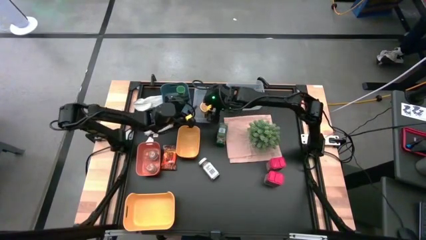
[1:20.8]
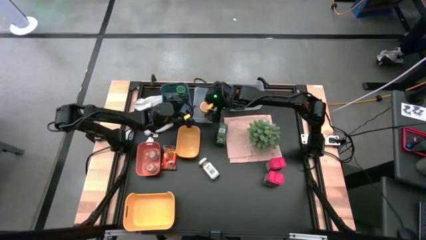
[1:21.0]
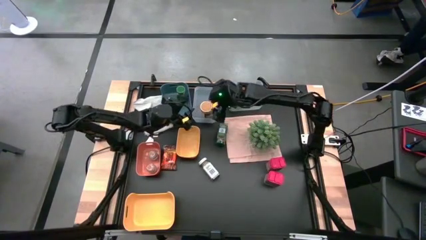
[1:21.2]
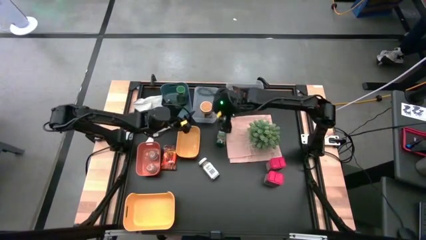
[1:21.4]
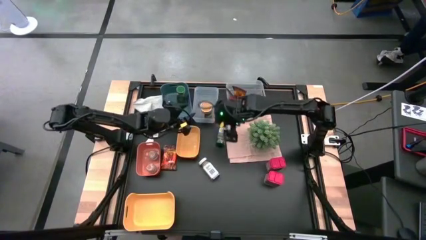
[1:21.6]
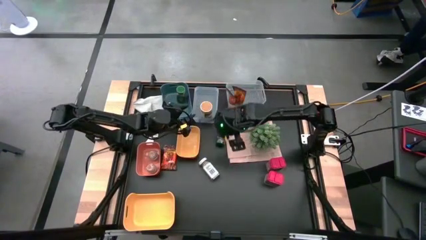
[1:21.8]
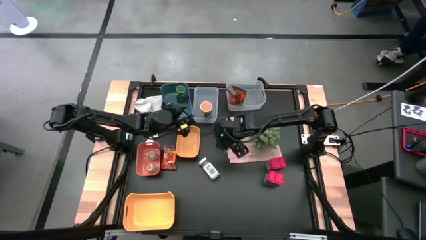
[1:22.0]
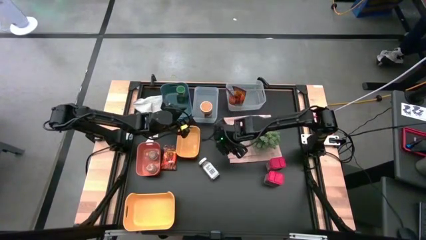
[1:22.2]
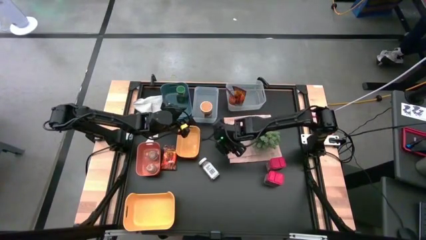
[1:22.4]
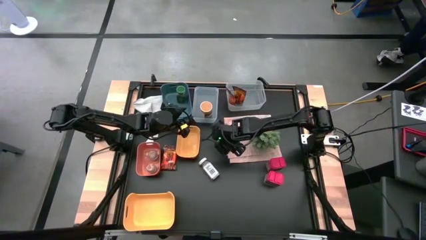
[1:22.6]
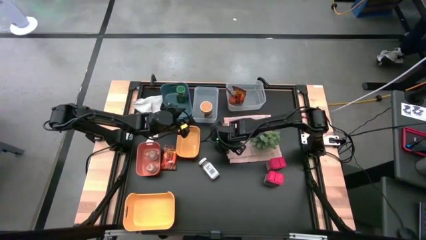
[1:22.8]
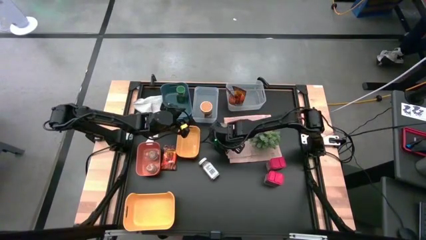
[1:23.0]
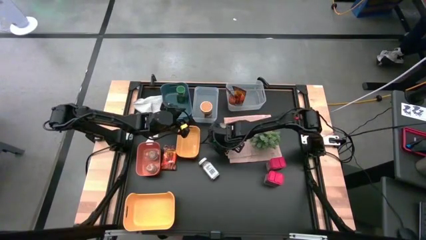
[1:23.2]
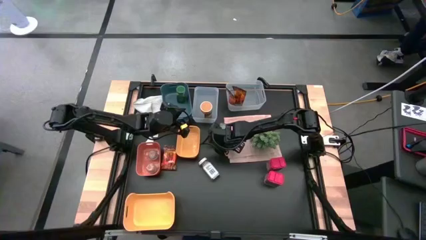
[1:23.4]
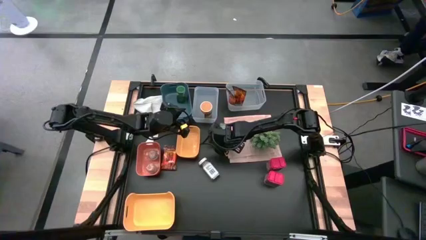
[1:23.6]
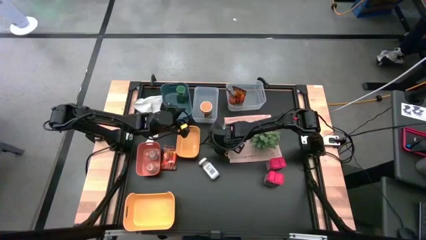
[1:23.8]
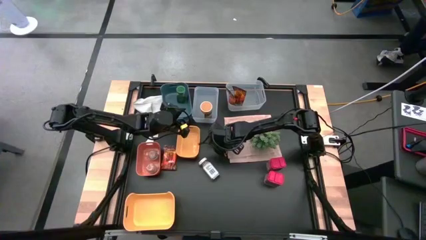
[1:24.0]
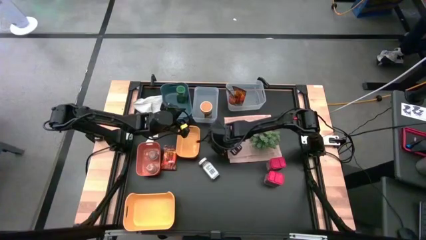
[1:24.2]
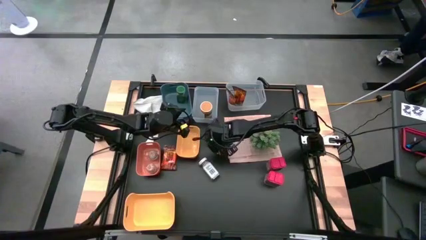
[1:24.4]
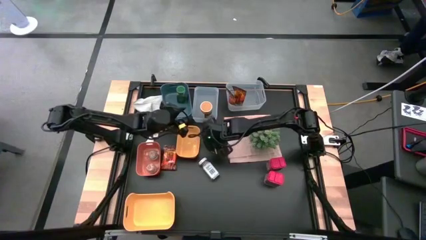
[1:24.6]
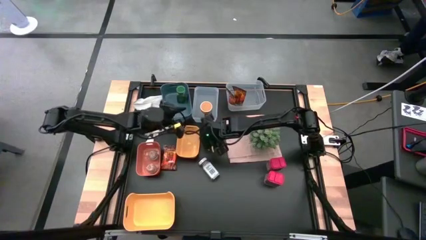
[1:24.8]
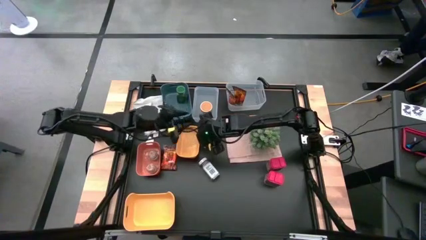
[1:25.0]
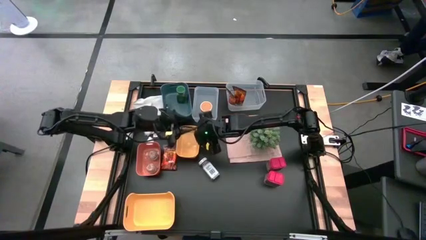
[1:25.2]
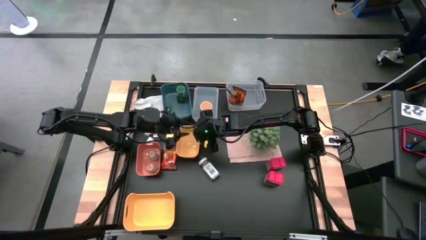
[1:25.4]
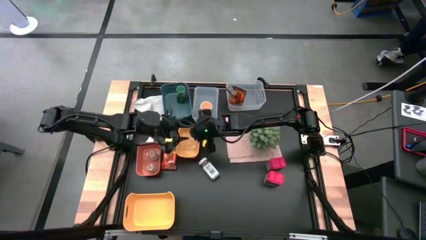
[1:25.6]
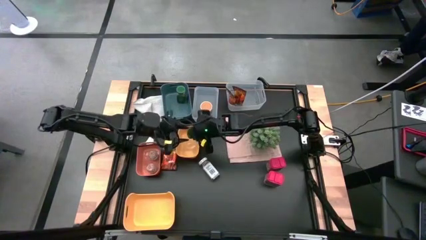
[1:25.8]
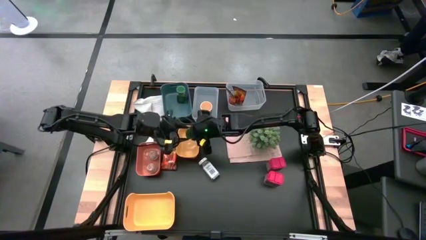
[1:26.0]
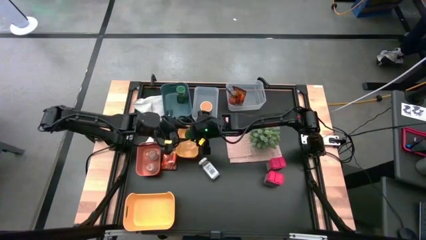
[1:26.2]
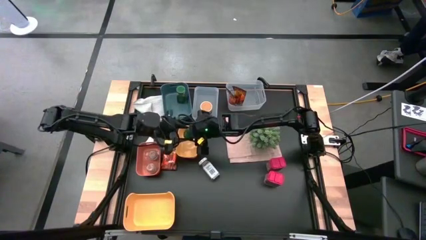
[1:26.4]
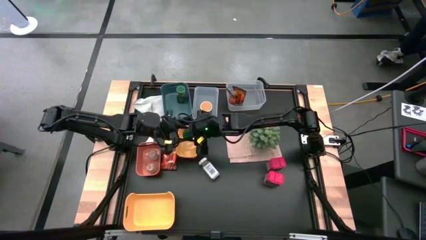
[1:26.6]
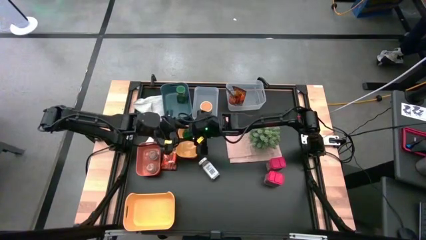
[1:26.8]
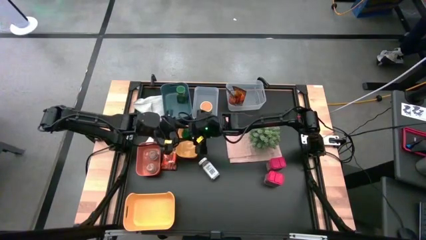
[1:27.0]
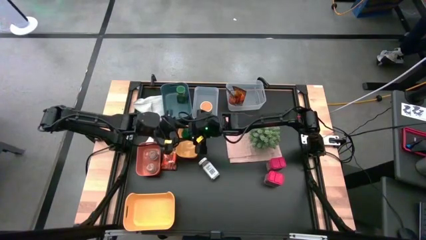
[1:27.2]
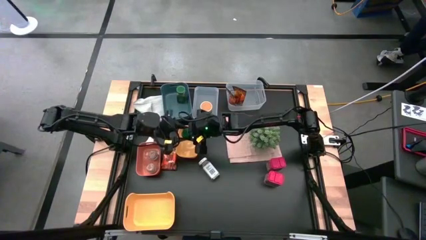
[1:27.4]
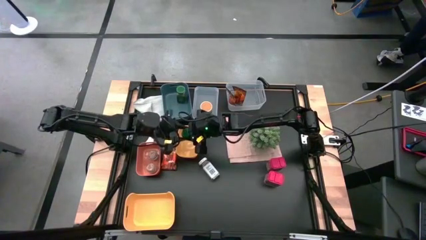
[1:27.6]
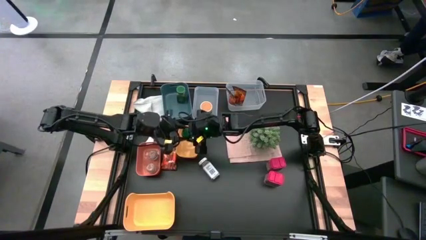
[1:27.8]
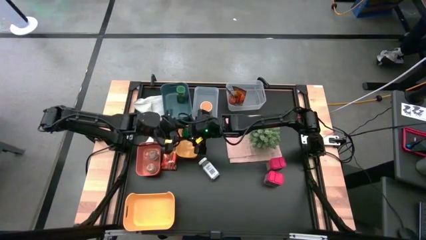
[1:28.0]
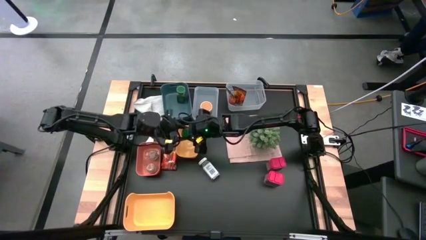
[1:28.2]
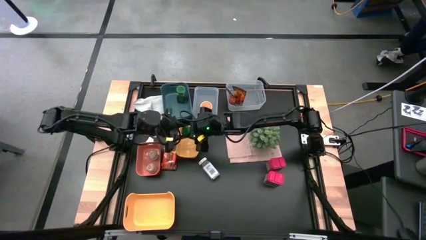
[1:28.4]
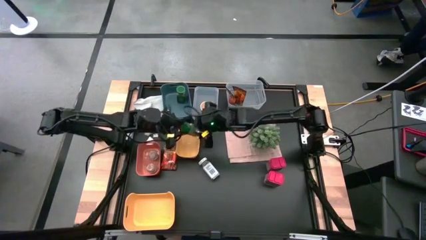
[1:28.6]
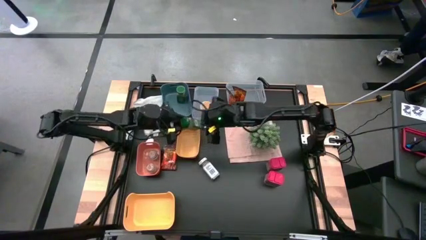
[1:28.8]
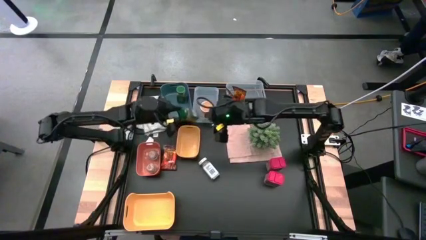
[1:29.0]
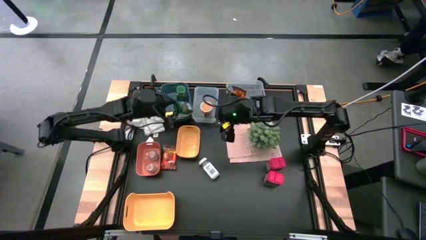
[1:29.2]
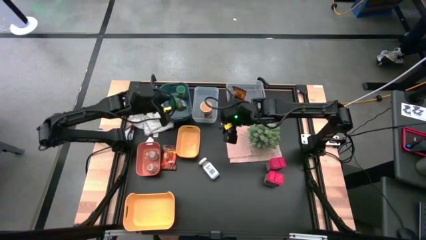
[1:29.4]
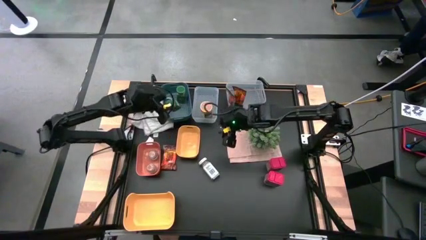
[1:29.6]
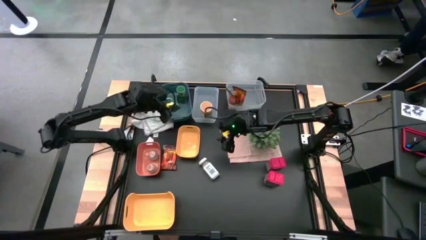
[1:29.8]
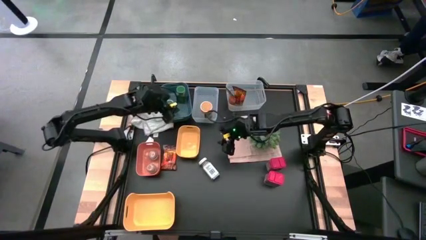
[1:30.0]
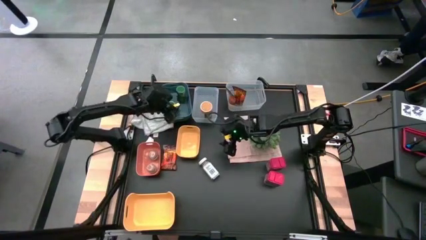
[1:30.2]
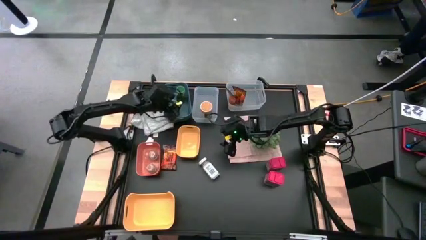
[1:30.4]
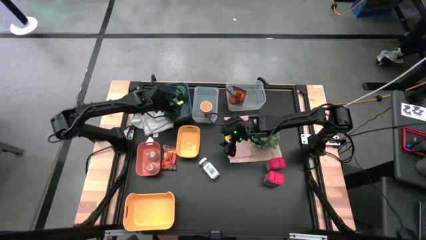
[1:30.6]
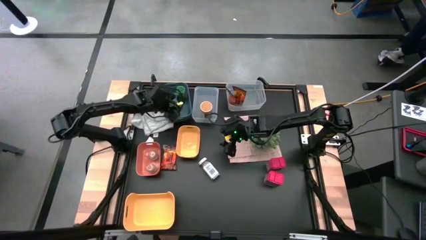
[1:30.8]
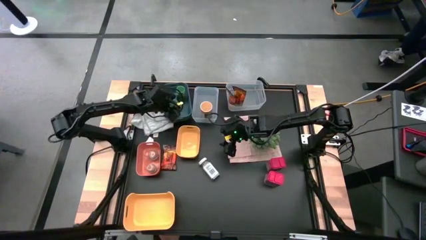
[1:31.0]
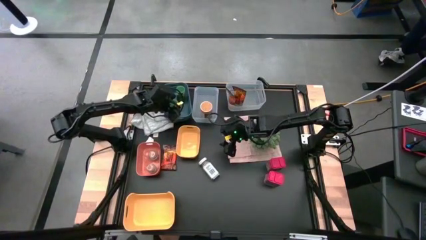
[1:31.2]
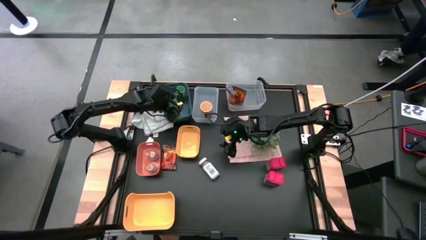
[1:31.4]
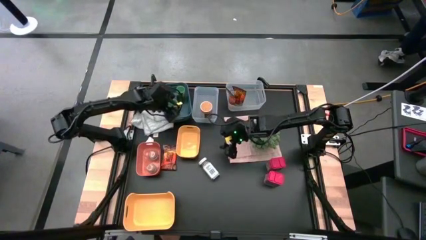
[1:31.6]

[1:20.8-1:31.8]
Task: Sort spices by type
Put the green seasoning bottle into the blue bin

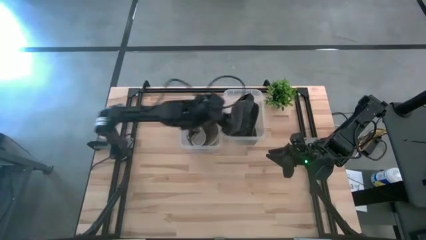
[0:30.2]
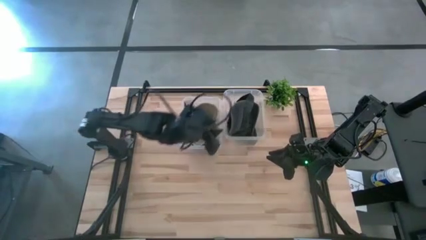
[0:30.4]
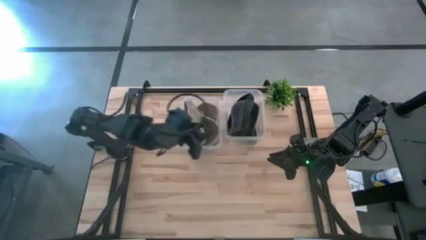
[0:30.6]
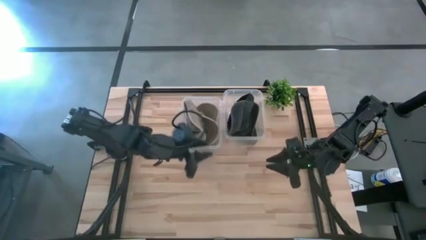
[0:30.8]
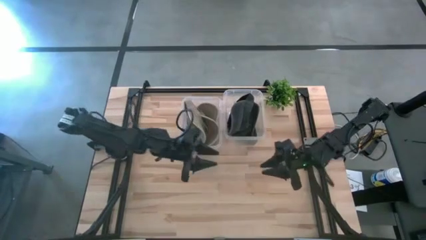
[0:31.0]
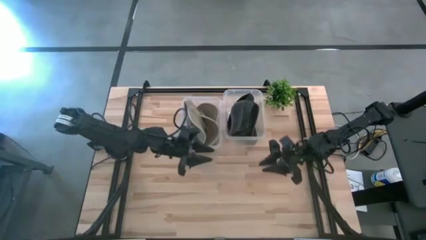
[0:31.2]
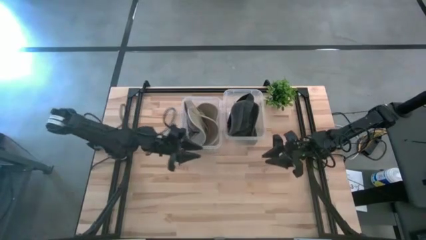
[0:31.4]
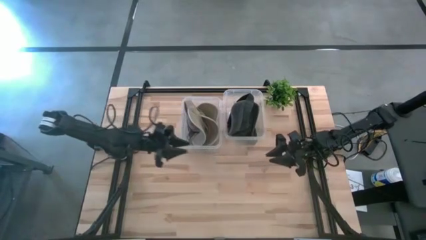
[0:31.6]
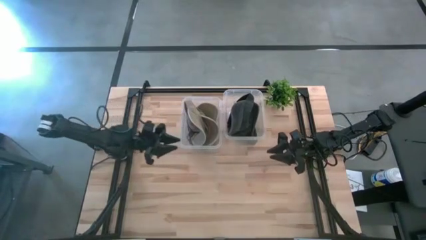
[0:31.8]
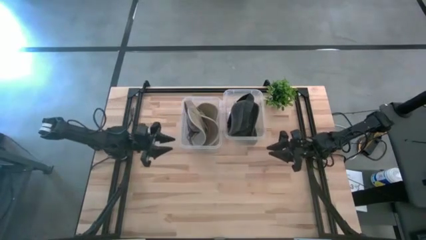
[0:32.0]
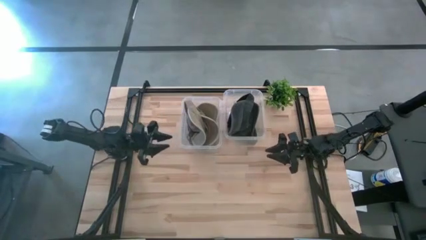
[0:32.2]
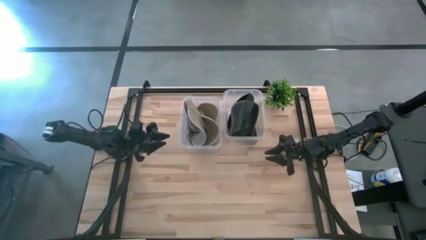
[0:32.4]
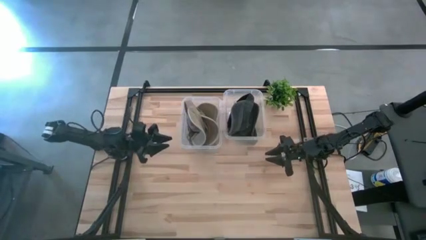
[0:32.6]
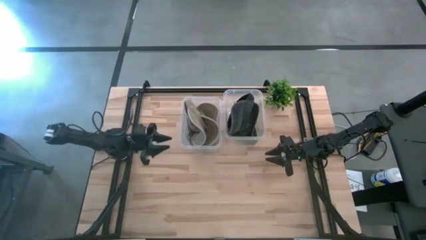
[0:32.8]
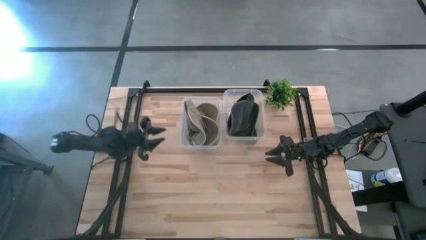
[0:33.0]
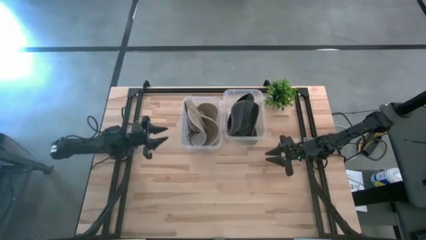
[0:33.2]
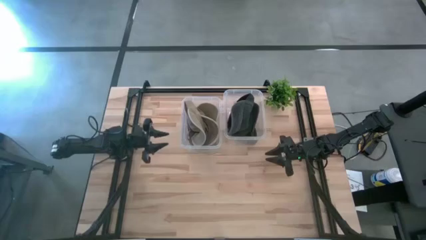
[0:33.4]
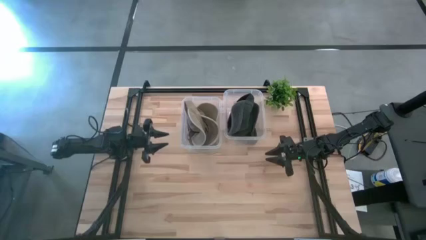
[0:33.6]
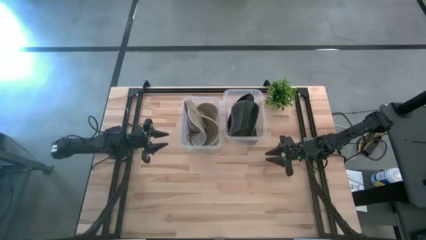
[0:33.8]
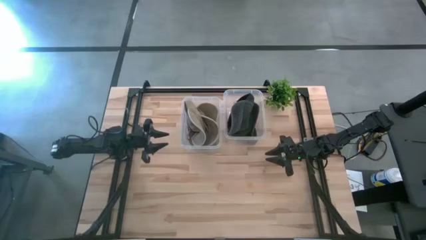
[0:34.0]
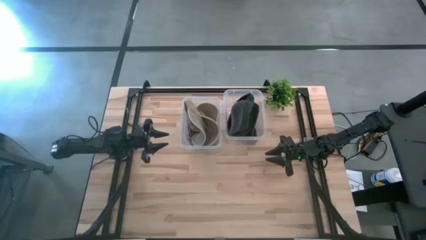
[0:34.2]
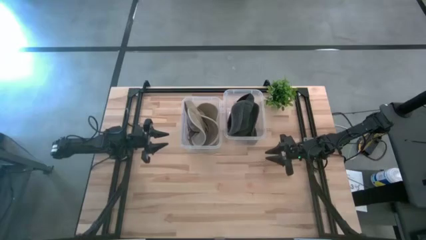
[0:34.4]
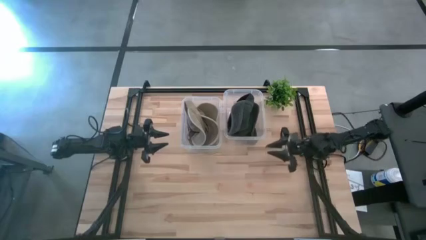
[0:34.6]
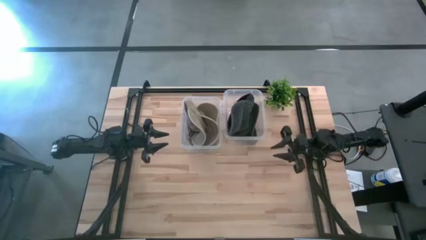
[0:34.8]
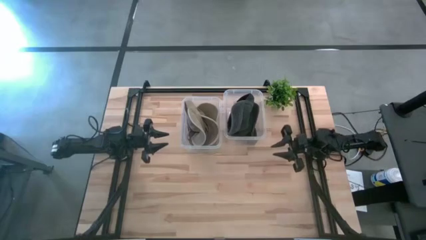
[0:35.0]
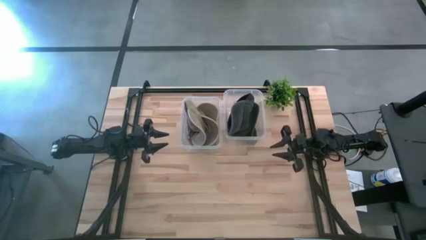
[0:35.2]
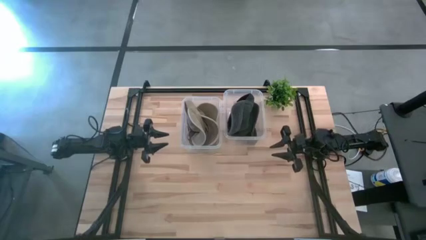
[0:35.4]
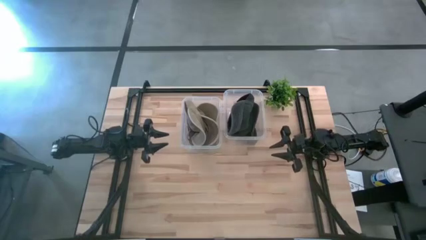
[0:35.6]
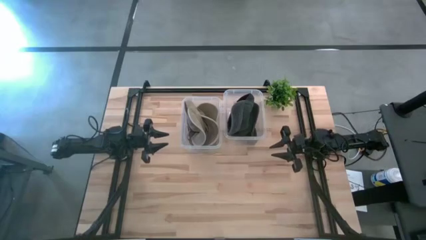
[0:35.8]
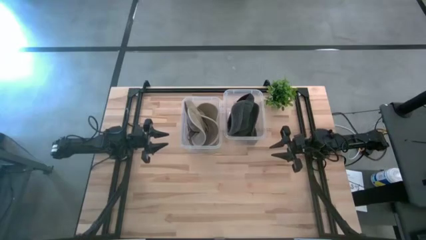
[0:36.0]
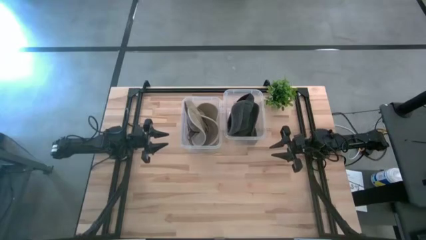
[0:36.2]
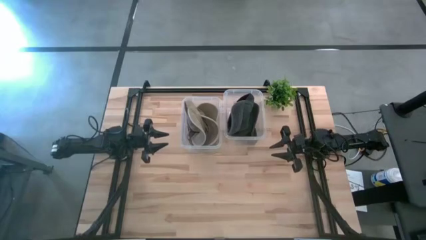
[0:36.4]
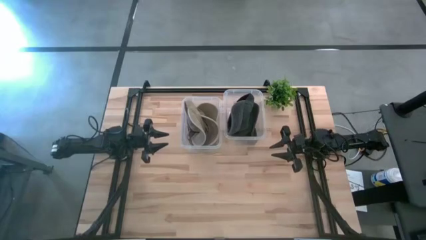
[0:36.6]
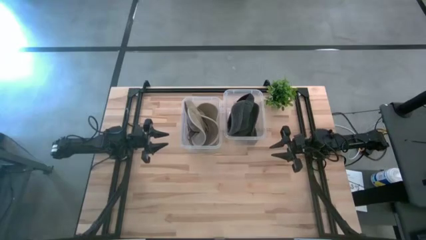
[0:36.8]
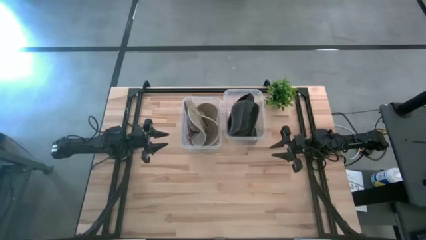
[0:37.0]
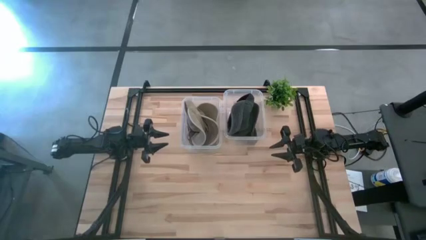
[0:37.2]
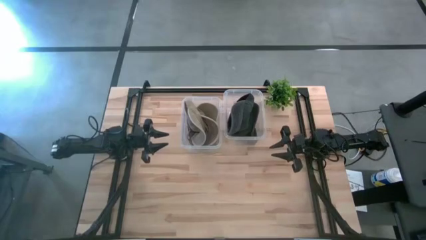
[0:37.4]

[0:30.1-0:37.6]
Task: Pick & Place hat
Return to Home Position
